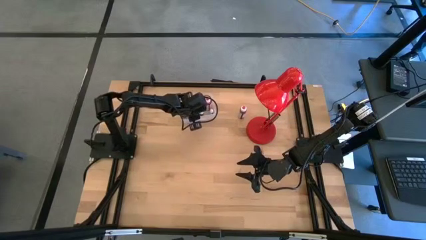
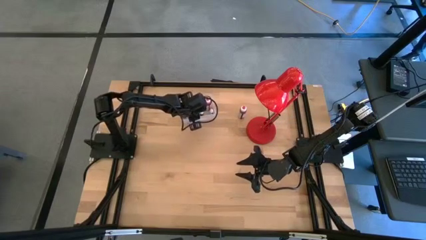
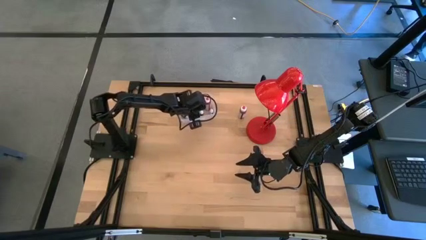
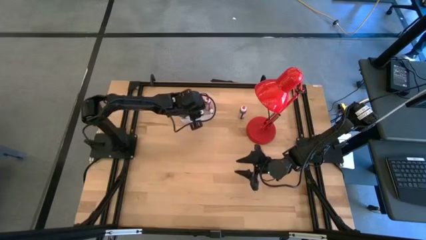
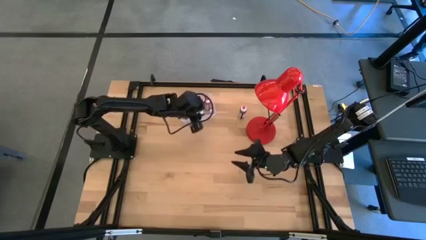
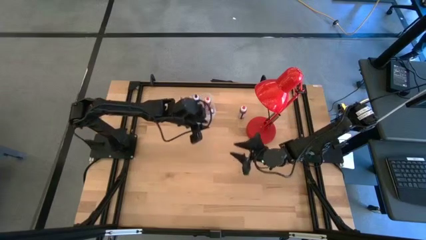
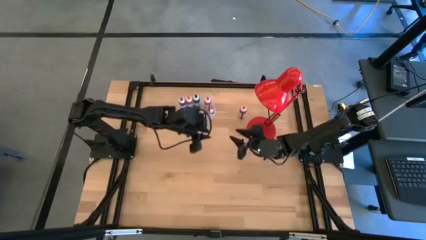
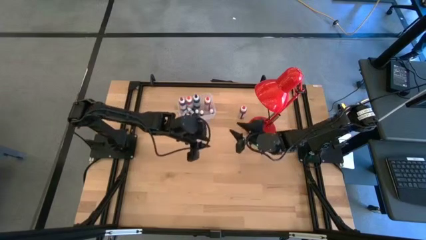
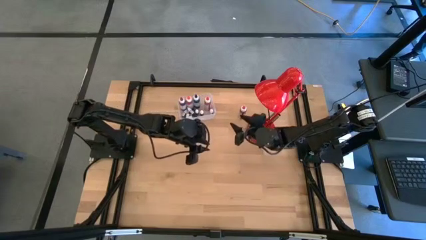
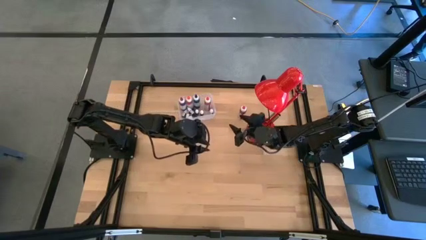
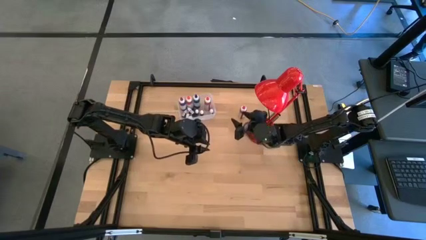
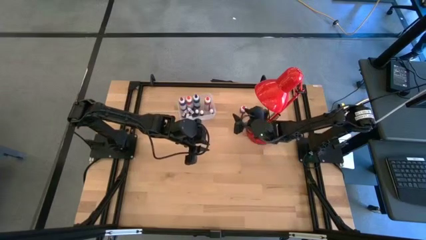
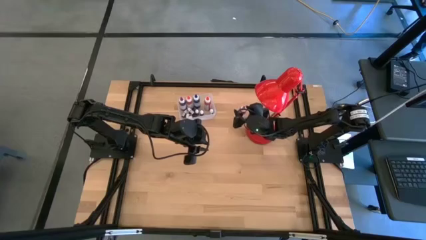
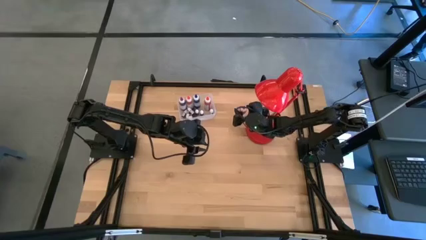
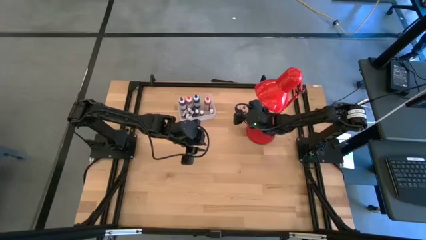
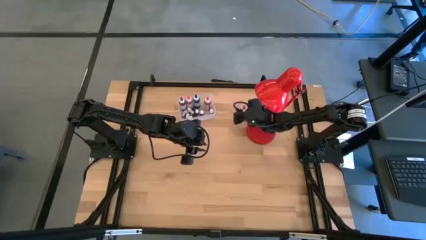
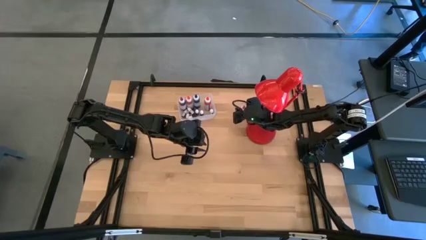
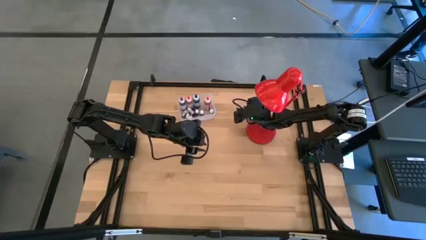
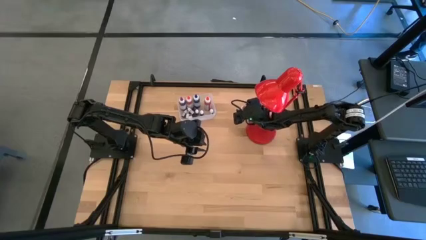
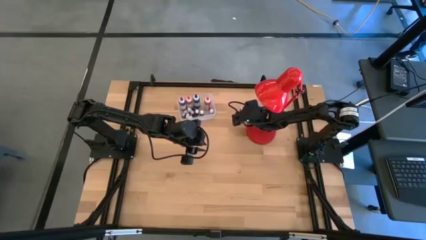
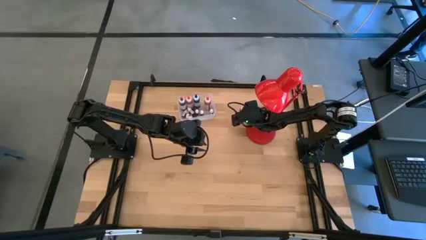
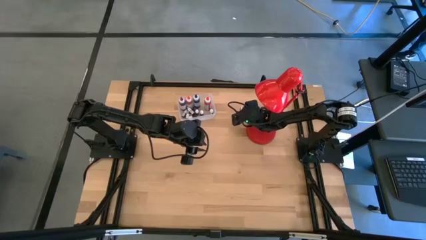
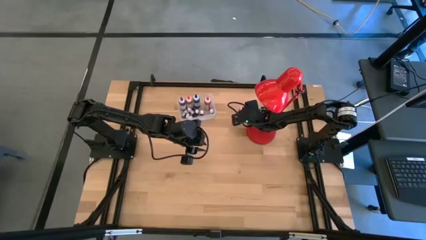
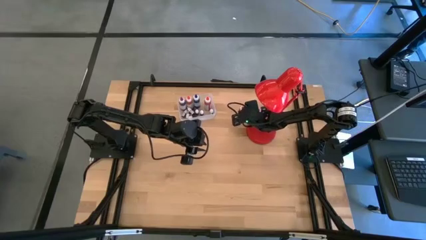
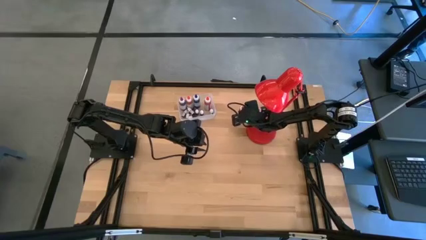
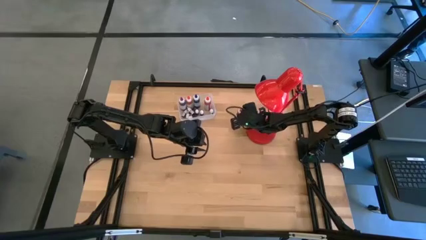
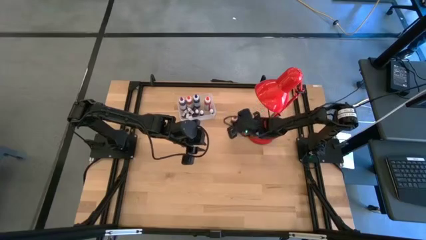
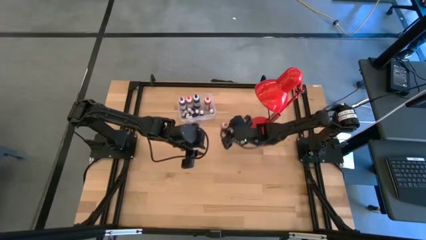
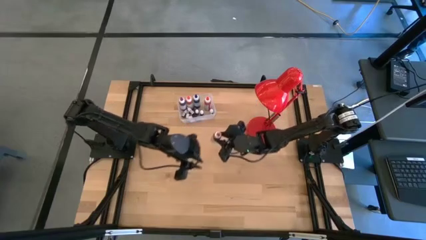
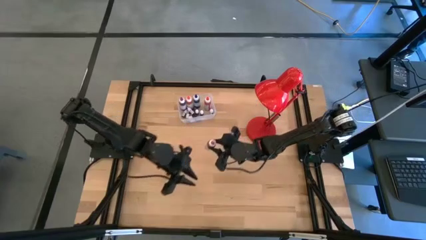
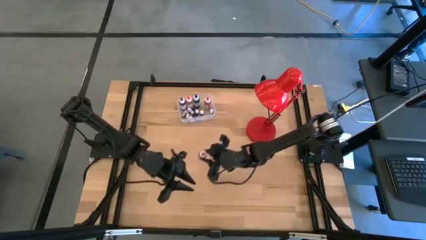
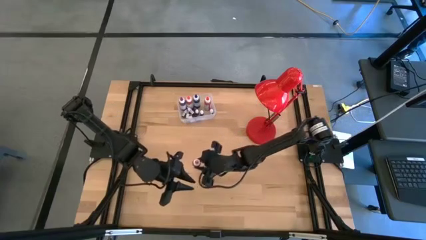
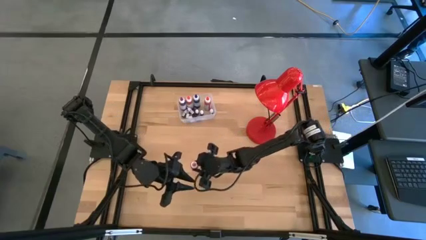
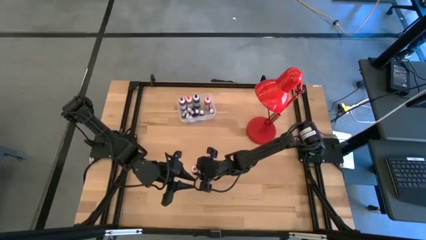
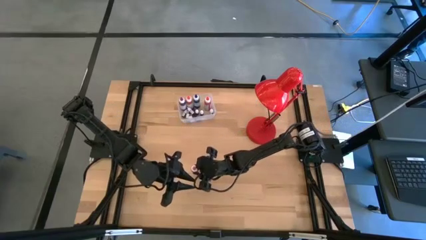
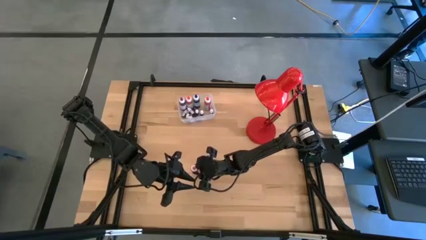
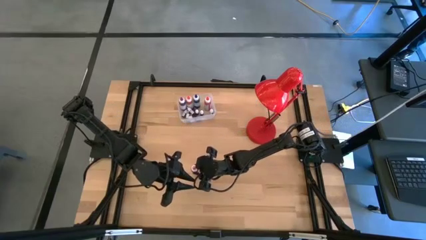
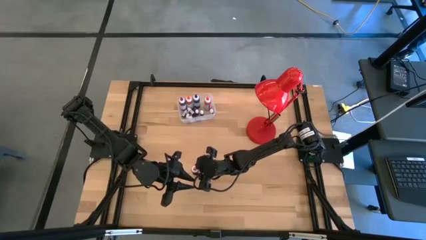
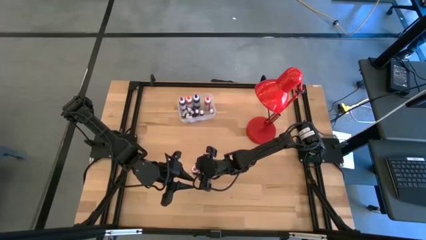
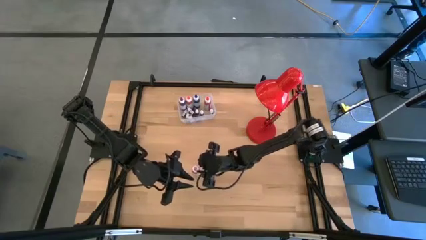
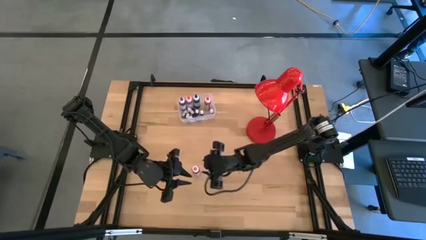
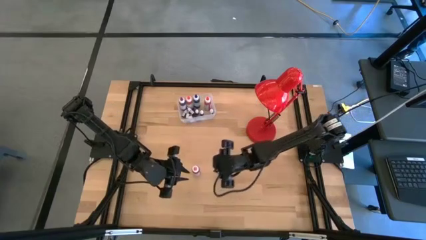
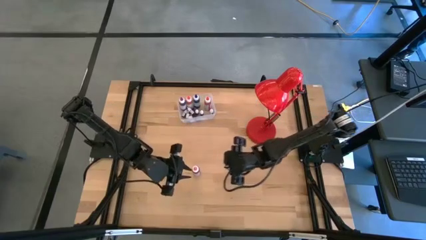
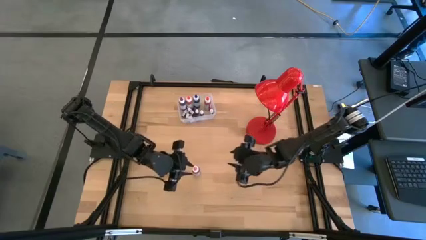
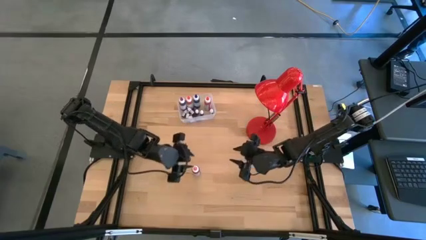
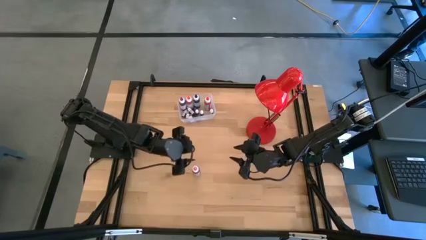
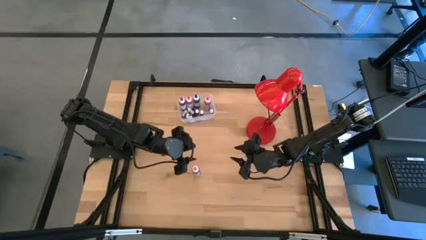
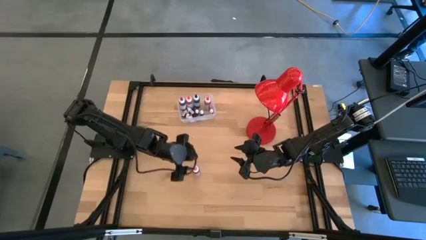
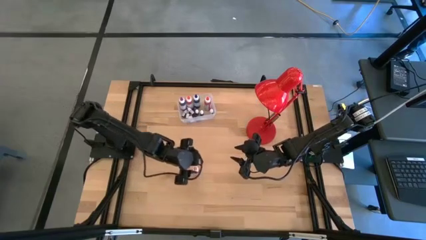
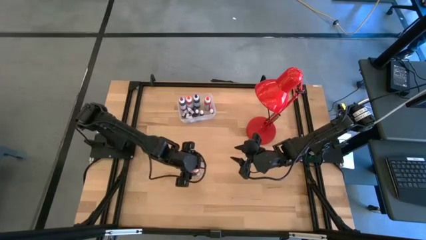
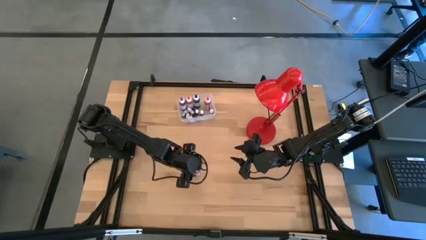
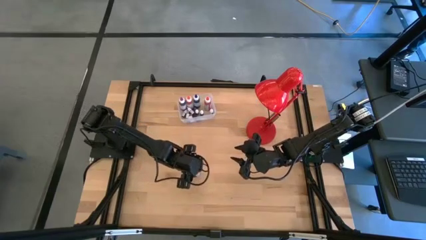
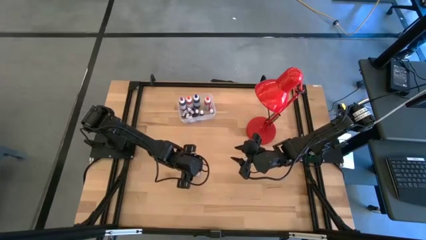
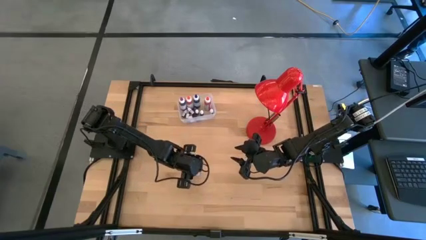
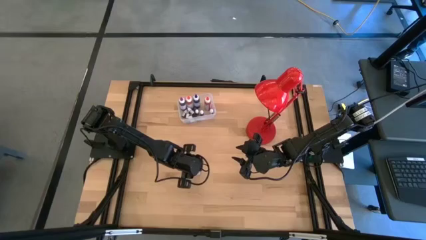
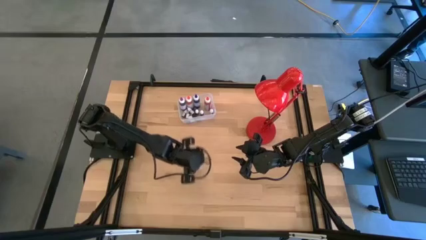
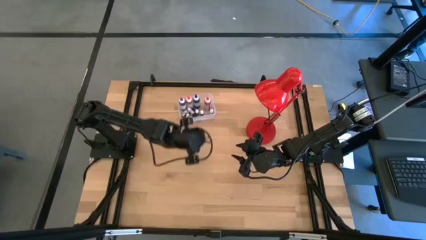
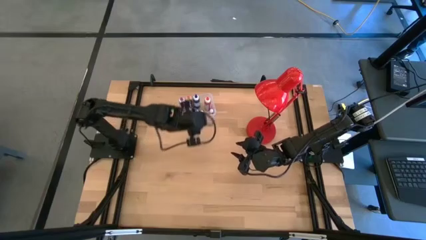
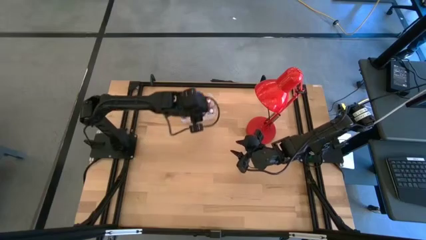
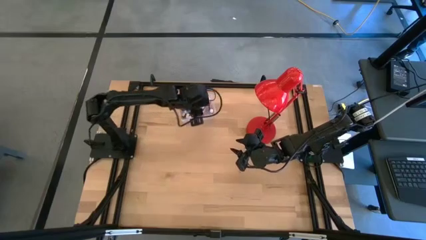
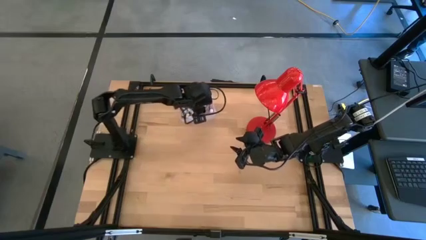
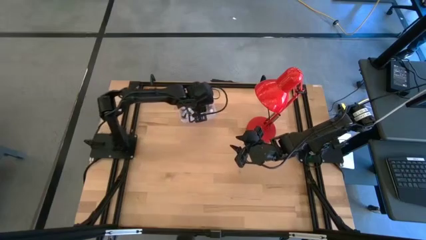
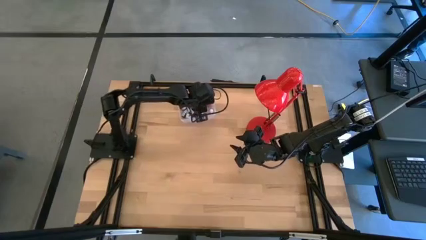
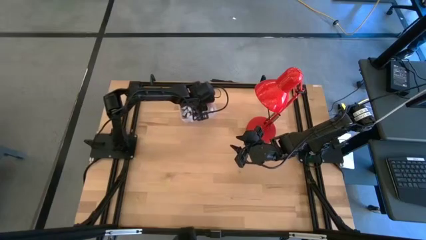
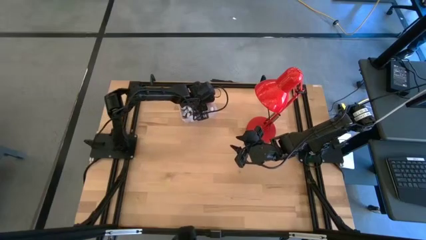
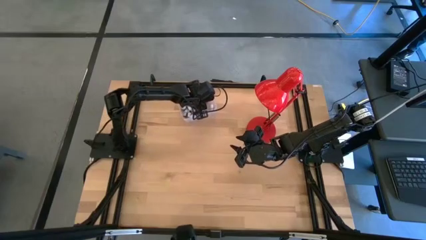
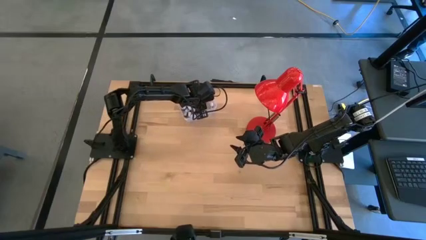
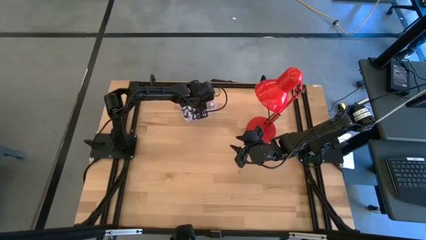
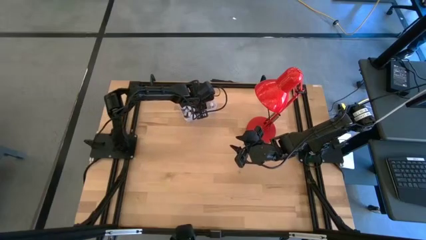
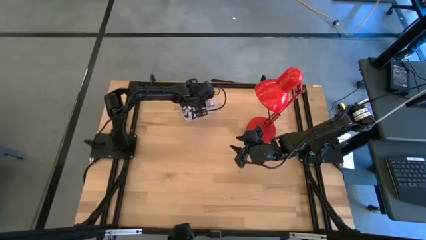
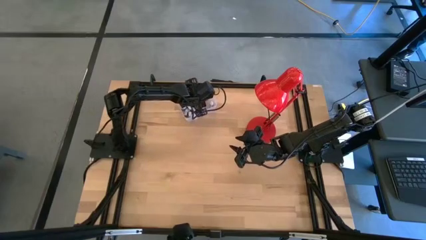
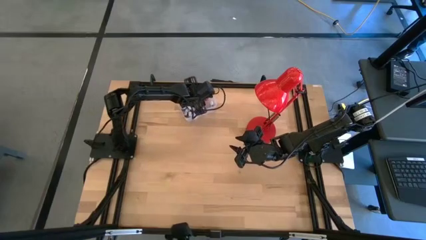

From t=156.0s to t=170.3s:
Task: Pick & Place food coloring
Put the large pink food coloring bottle into the transparent bin

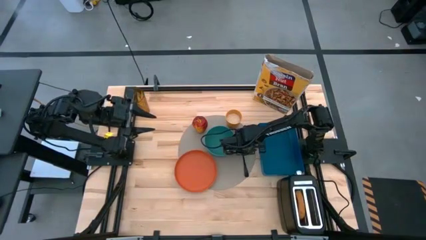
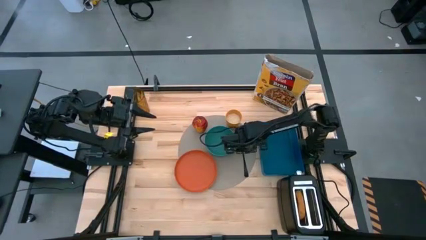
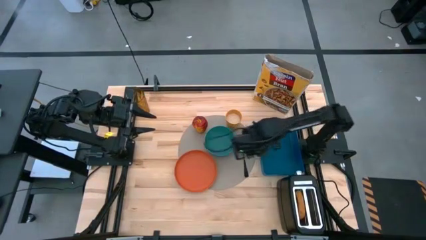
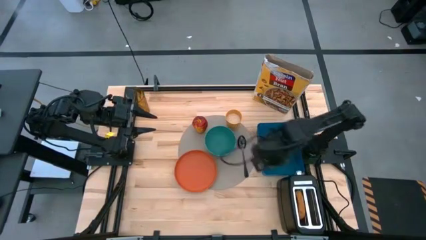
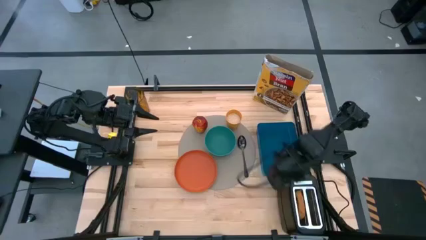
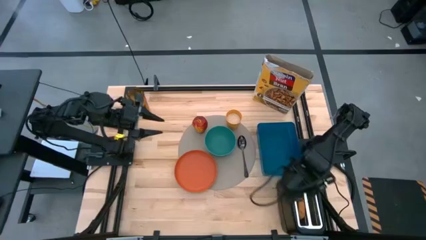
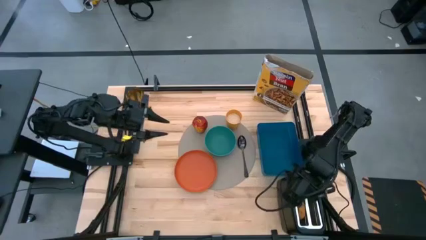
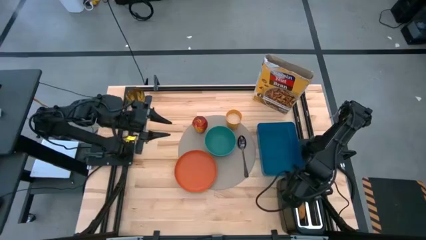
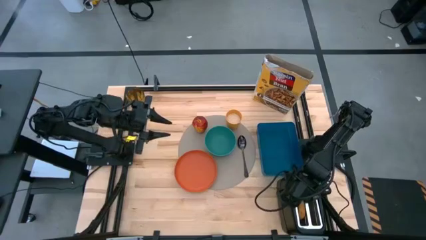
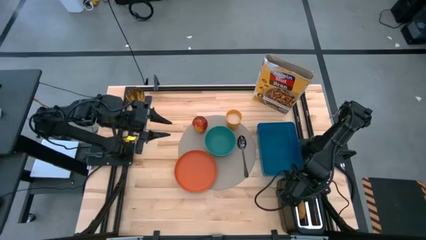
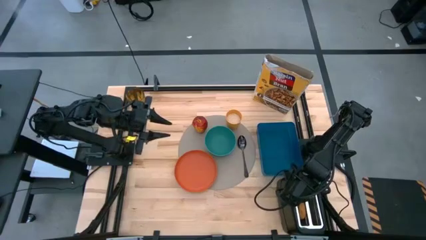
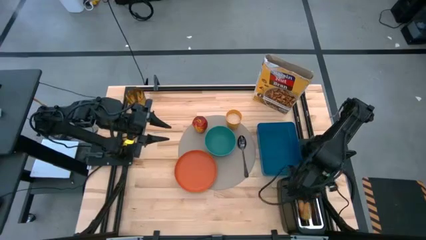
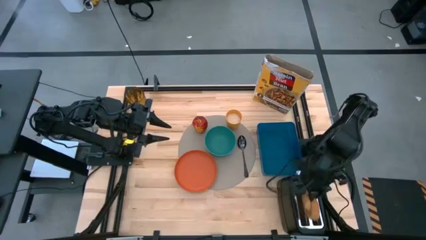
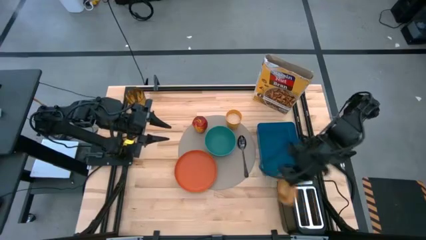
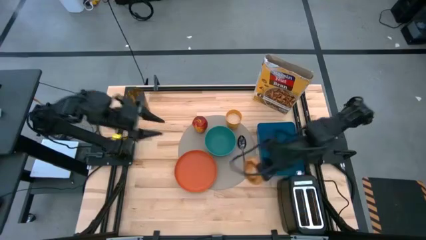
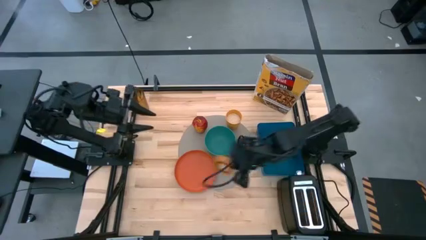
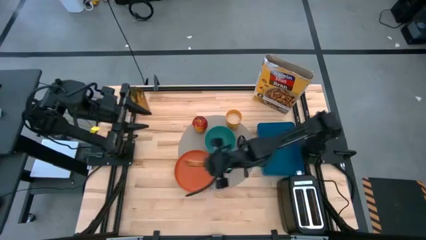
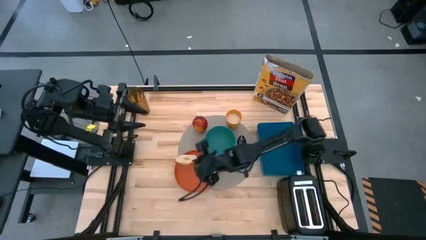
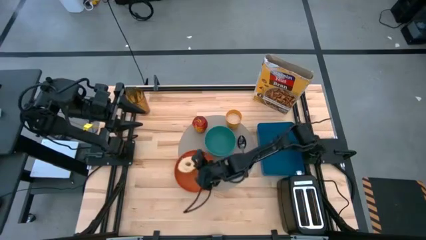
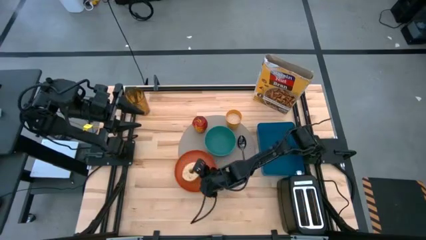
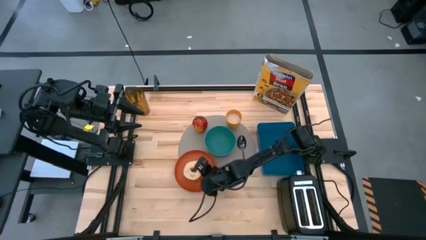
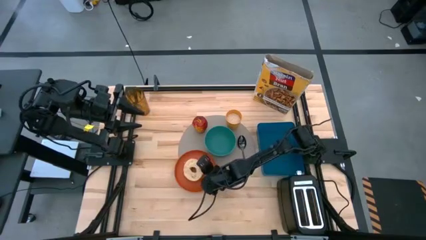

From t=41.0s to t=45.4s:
Task: Arrange a breakfast setting
Put the bread on the orange plate
